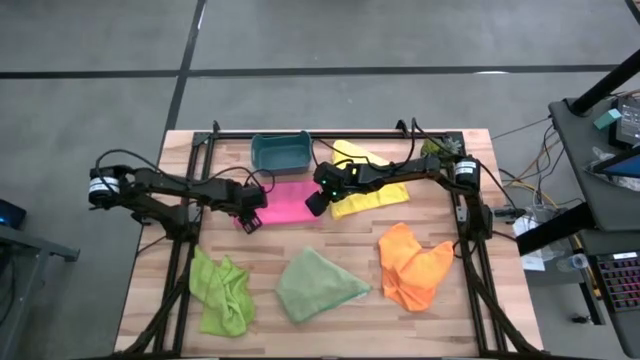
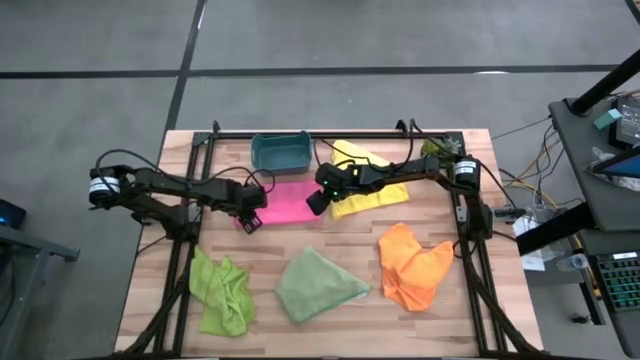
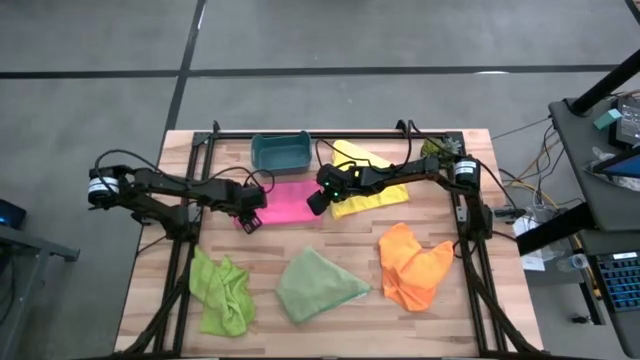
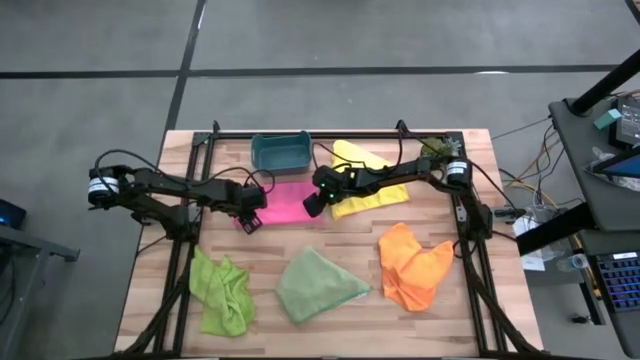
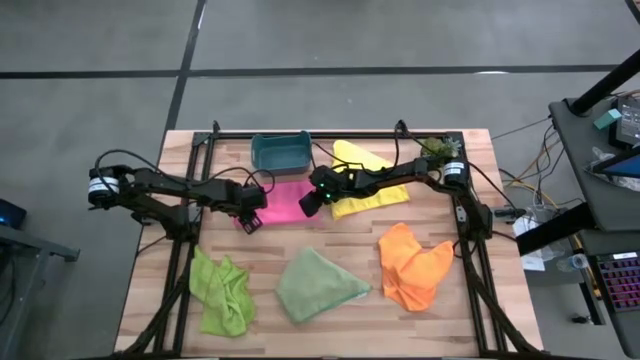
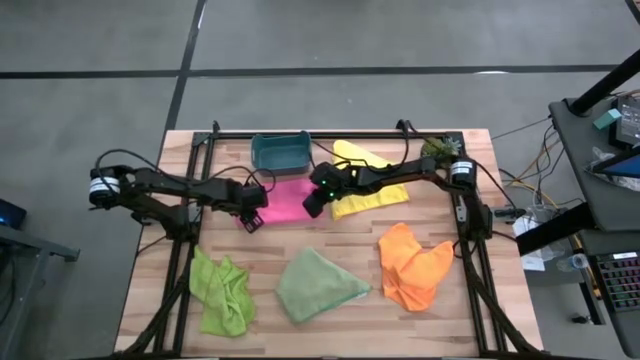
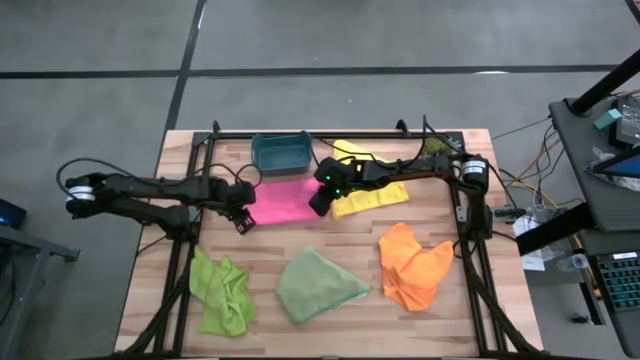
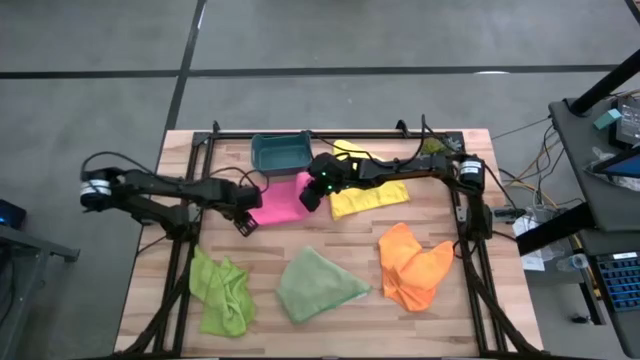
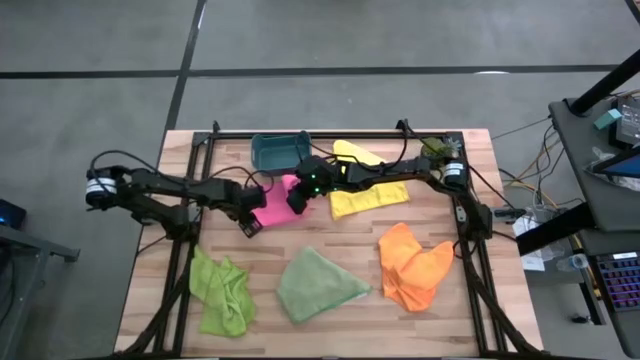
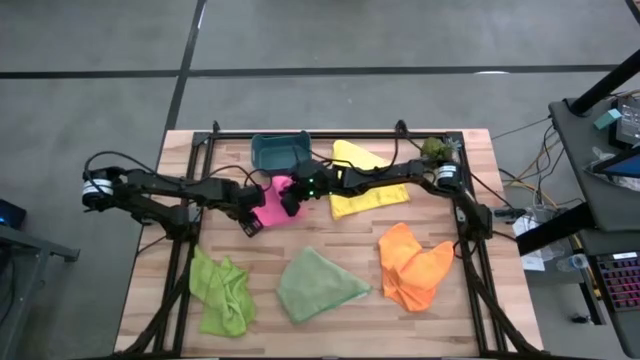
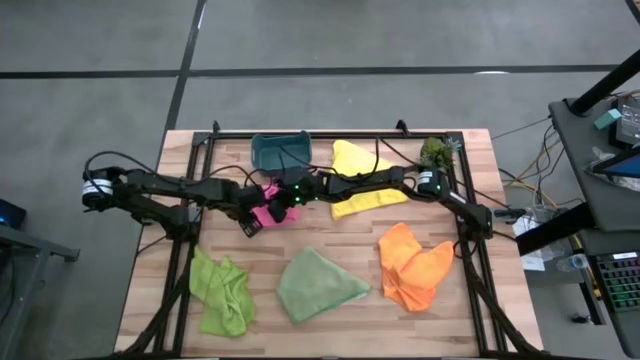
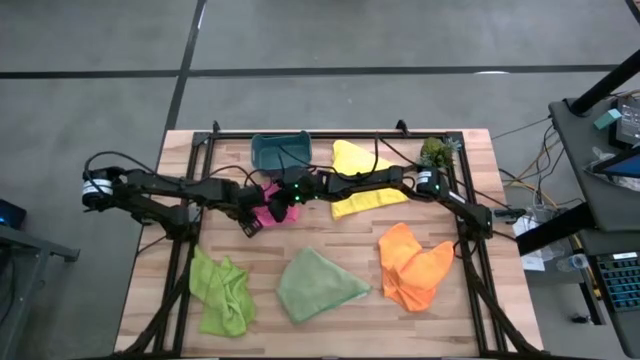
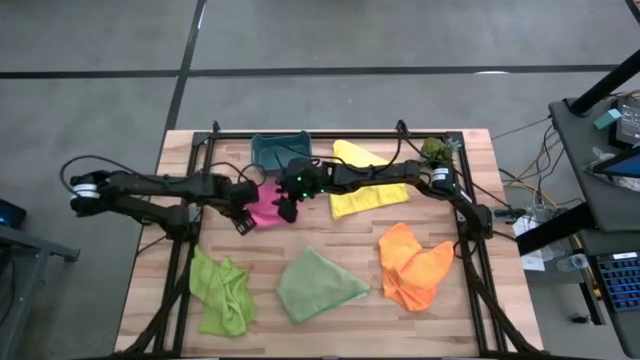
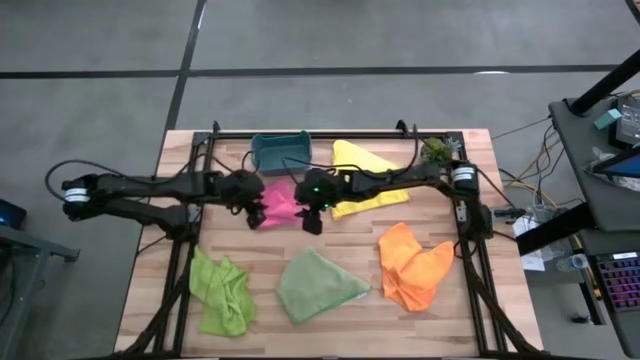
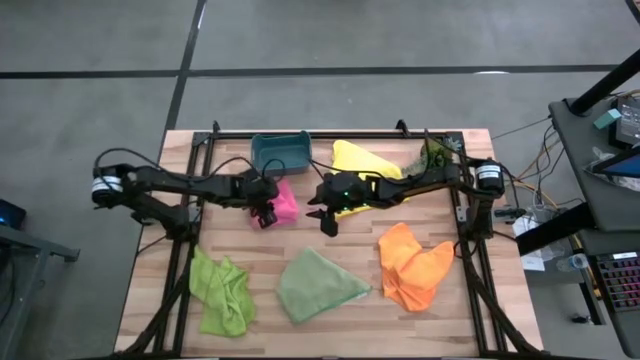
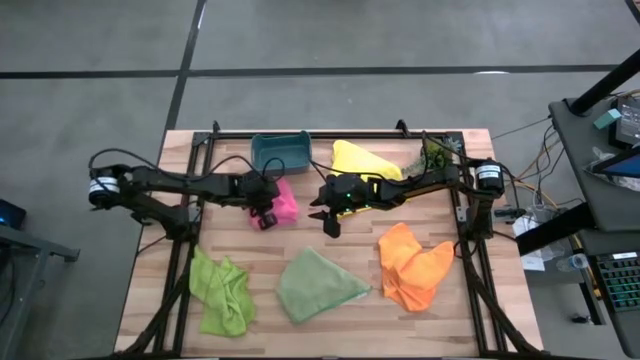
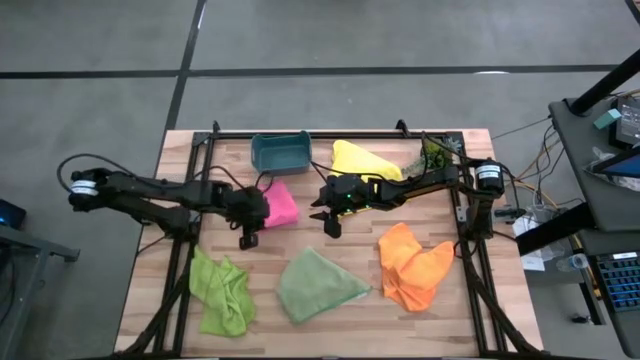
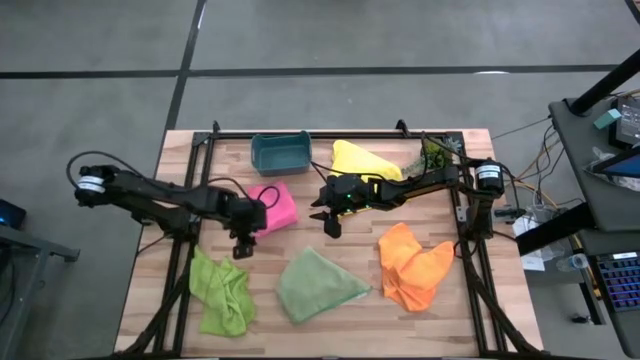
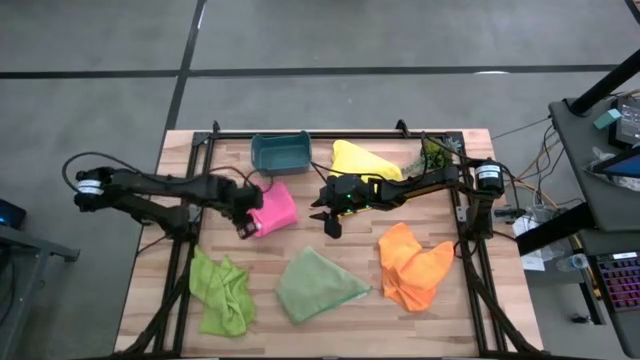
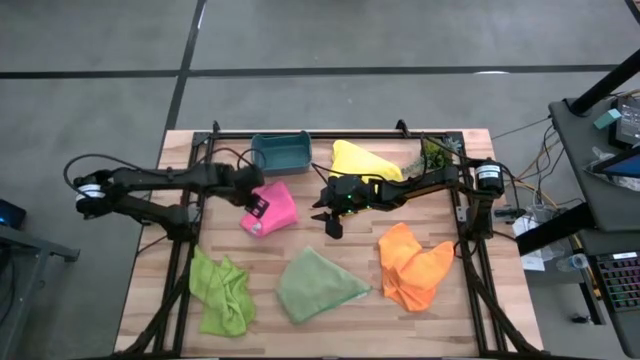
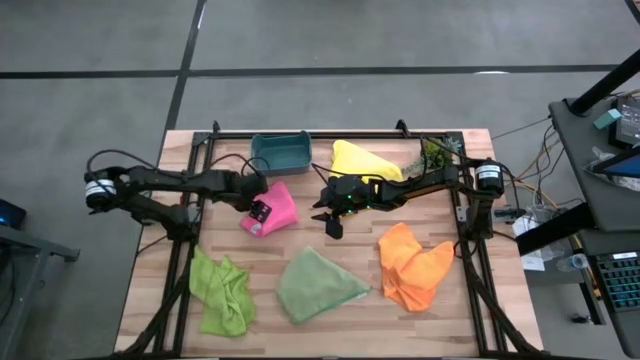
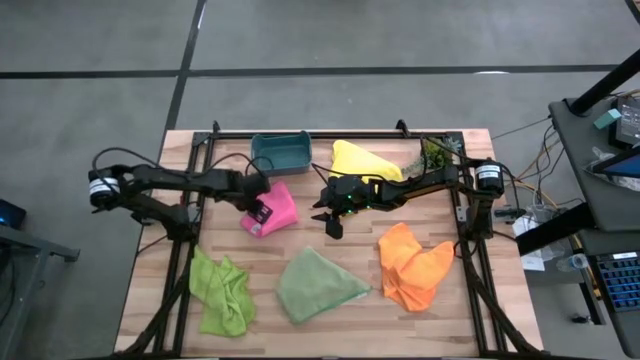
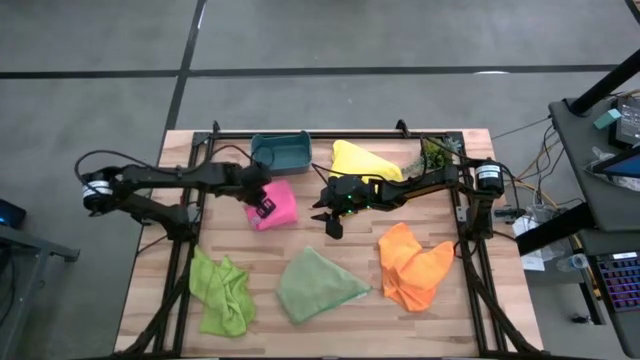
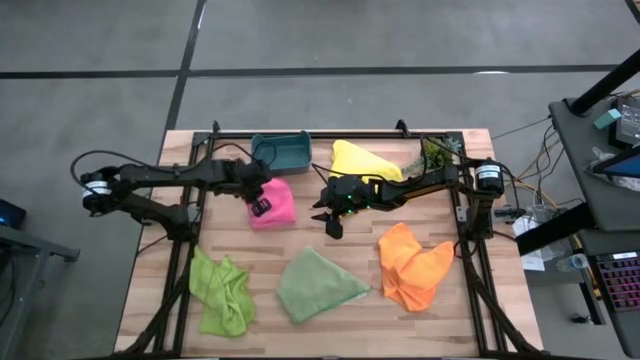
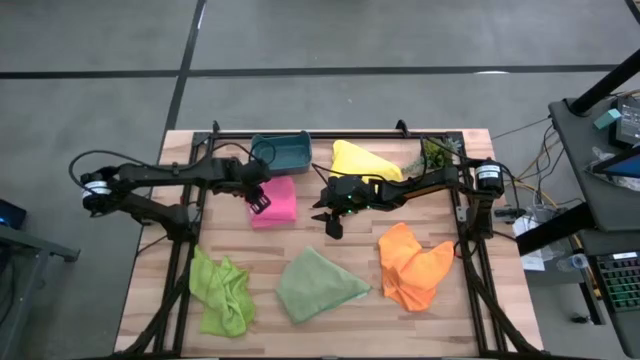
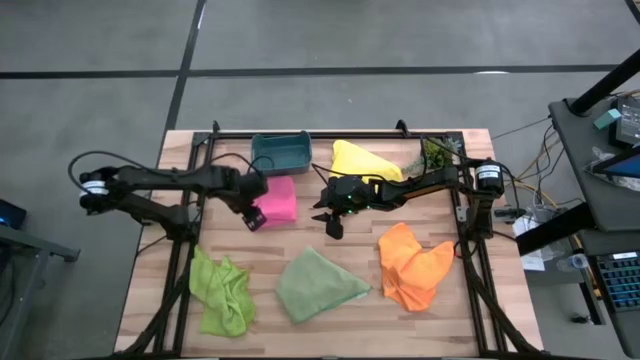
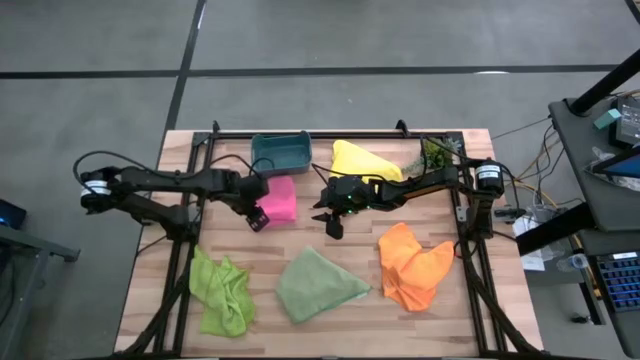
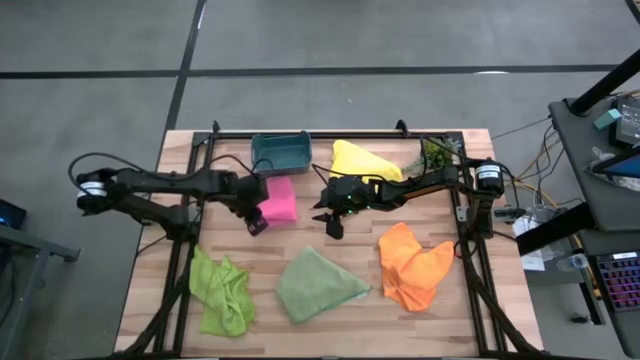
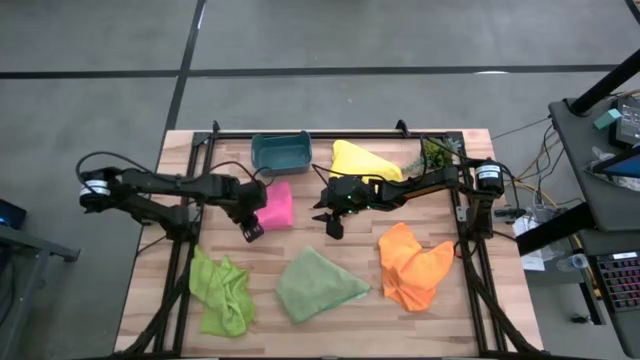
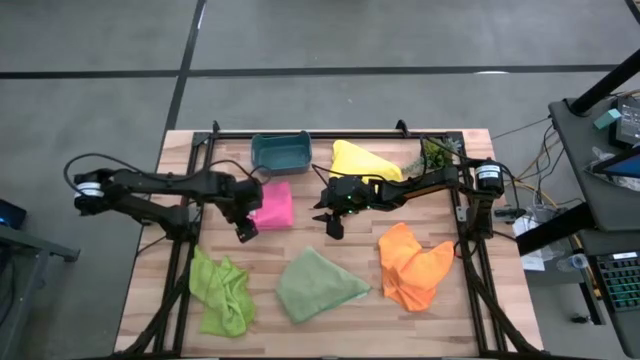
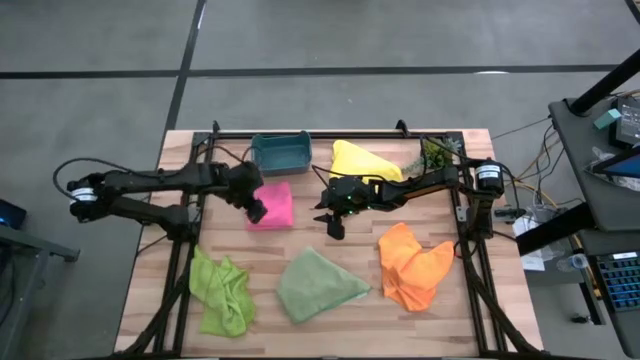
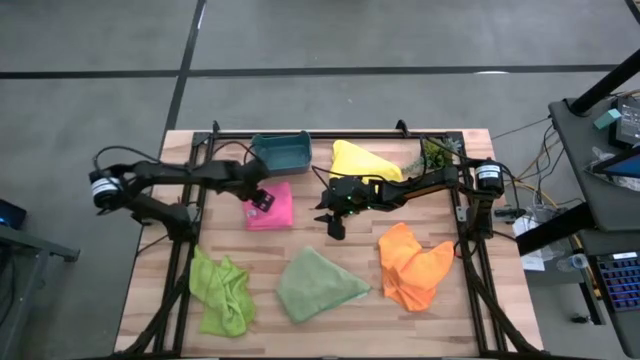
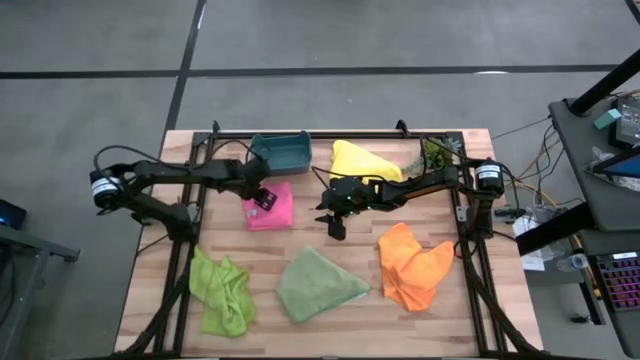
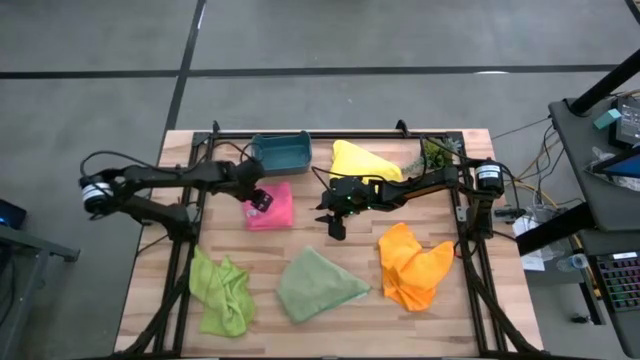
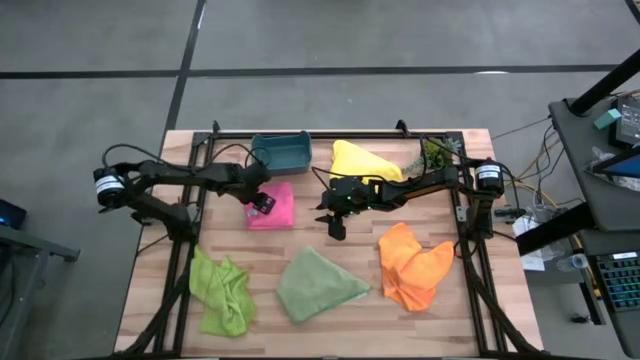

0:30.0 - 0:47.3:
Task: Fold microfiber towels
Fold the pink microfiber towel

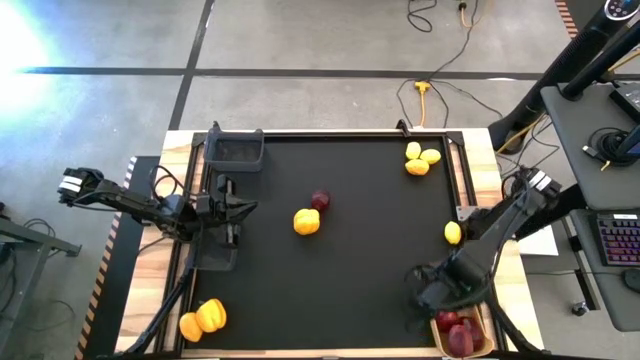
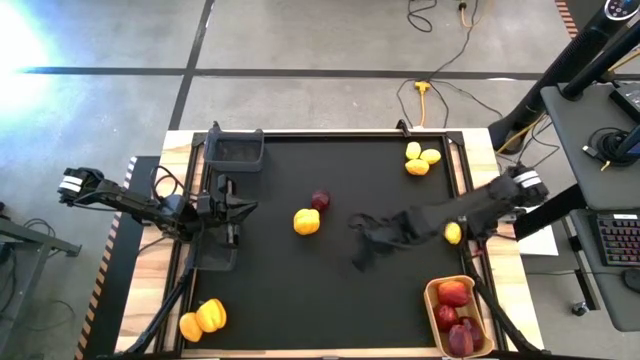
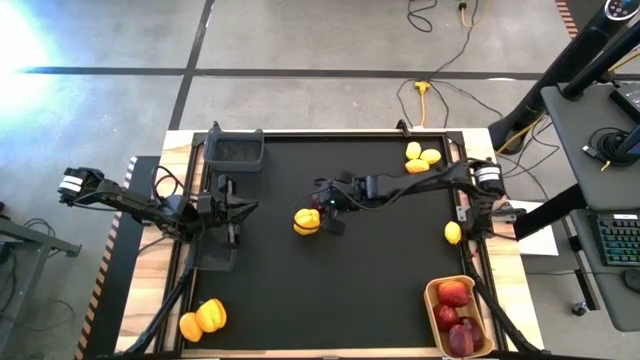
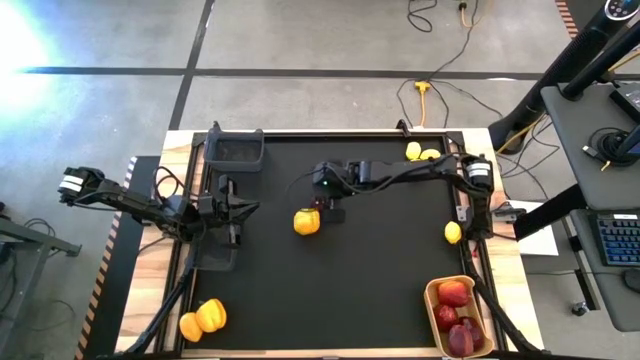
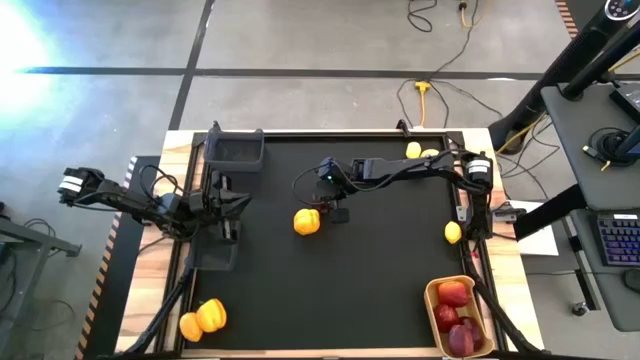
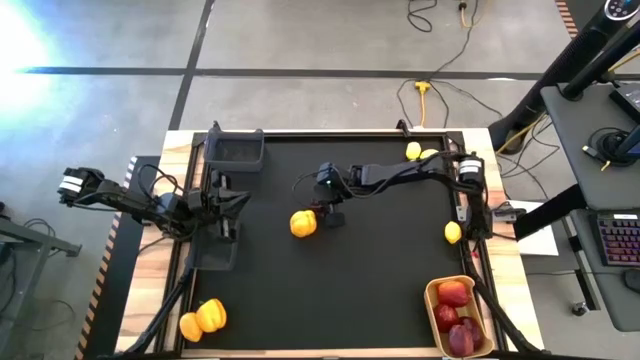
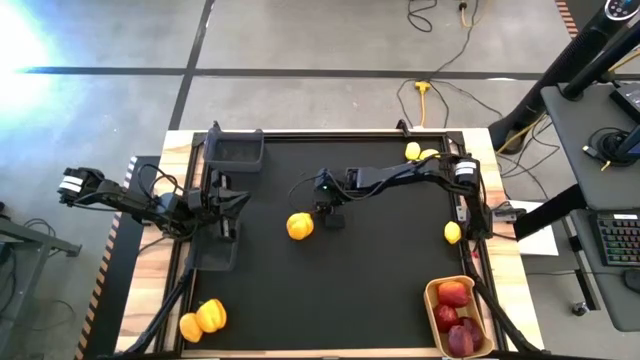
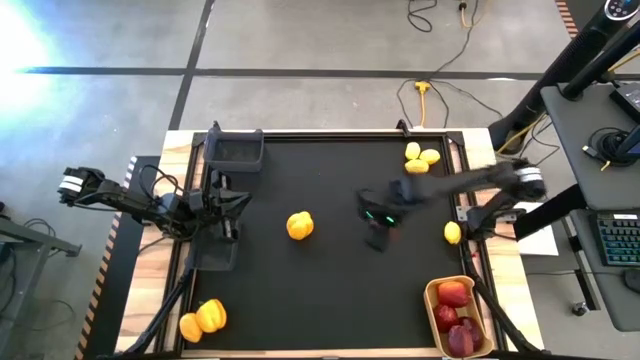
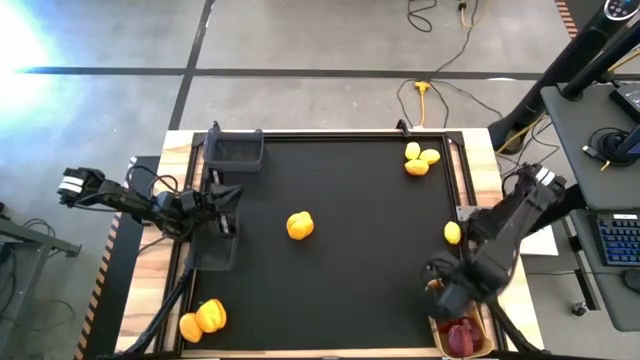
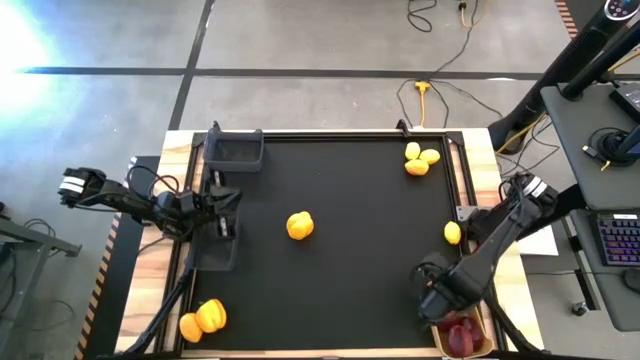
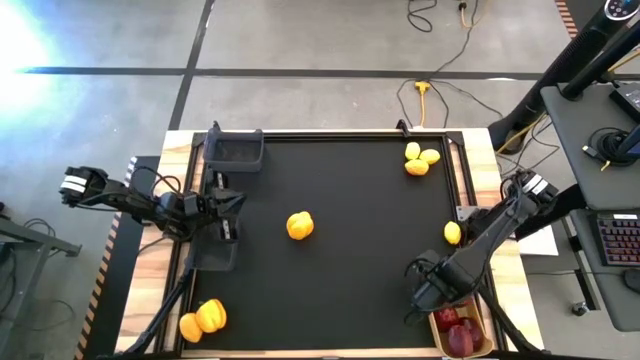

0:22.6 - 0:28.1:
Task: Sort produce into baskets
Put the apple into the yellow bin
